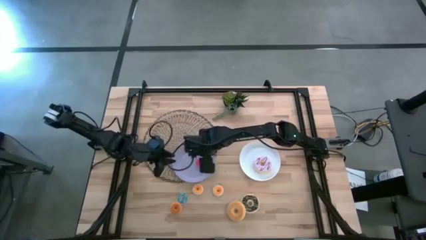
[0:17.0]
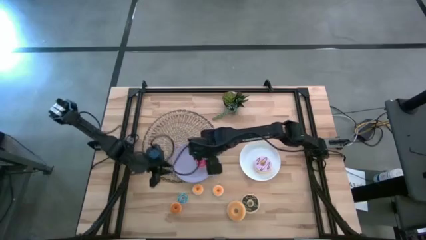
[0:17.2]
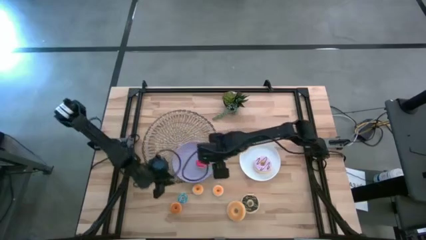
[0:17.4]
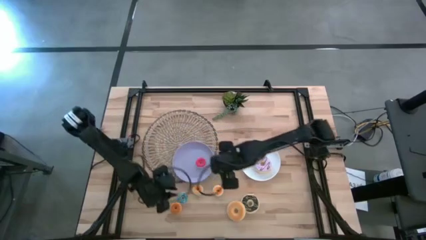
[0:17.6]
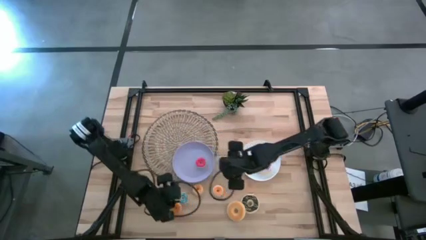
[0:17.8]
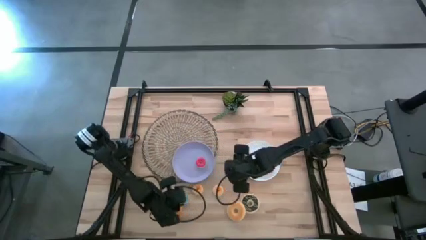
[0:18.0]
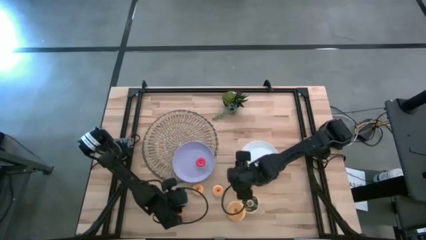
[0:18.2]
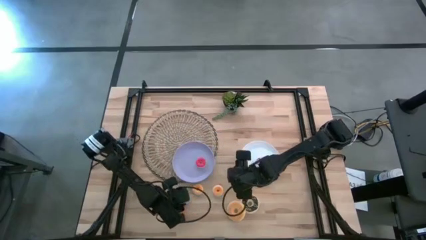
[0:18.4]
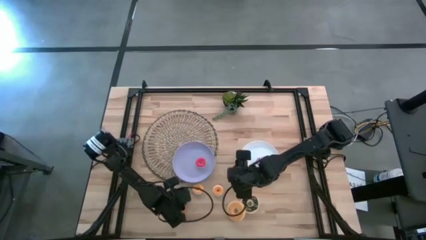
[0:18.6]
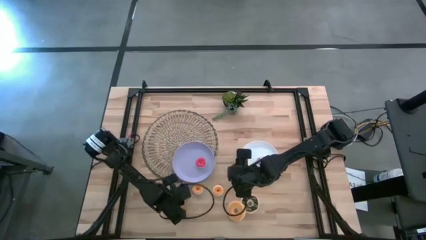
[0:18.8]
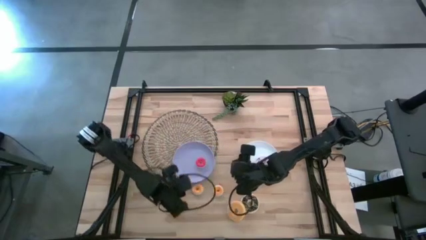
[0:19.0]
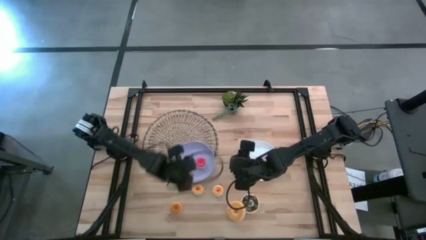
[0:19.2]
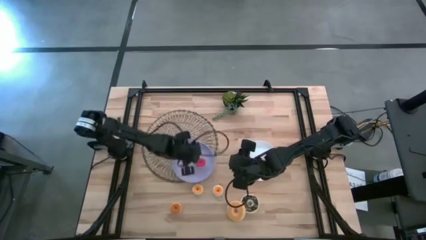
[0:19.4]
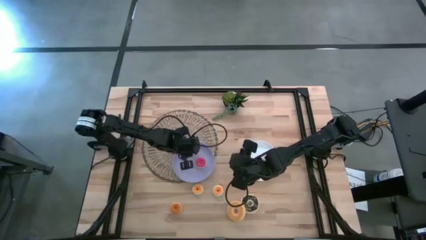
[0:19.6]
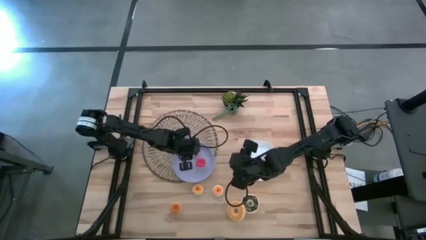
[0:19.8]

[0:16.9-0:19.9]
Task: Pick & Place donuts
Put the small blue donut on the purple plate

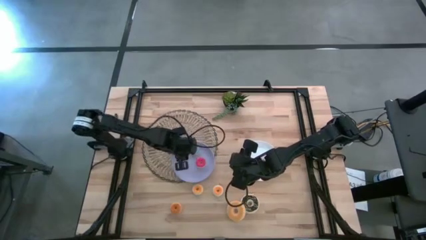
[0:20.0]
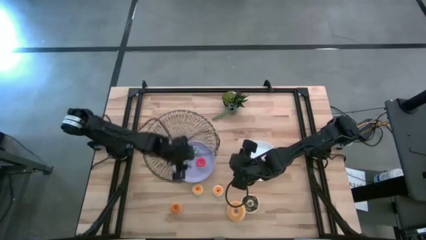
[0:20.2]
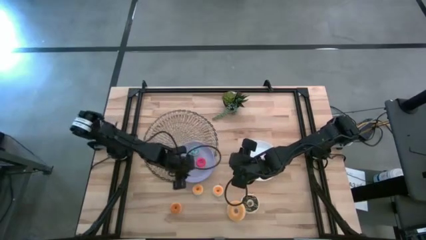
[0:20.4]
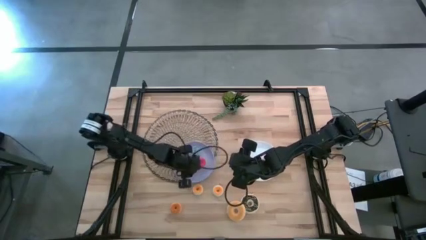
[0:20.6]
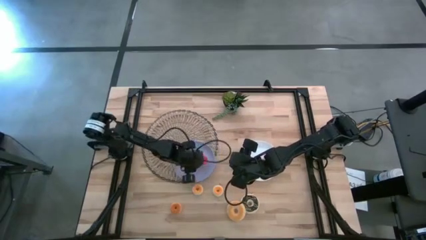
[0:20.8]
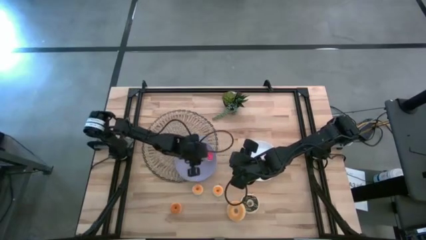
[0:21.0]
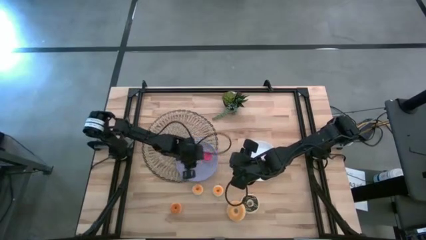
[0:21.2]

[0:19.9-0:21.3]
Adjust the small red donut on the purple plate

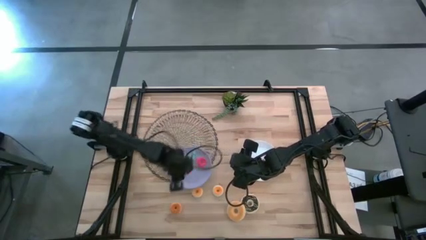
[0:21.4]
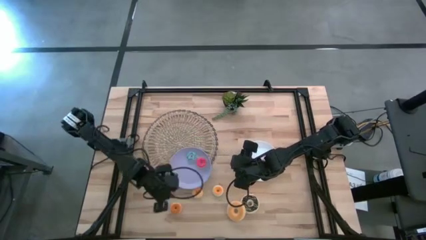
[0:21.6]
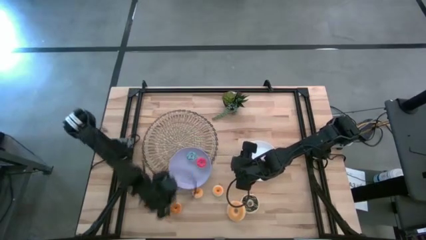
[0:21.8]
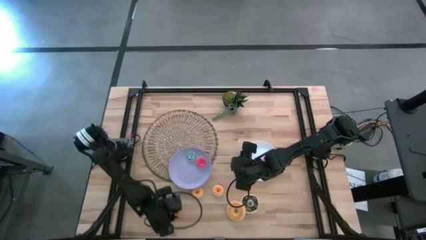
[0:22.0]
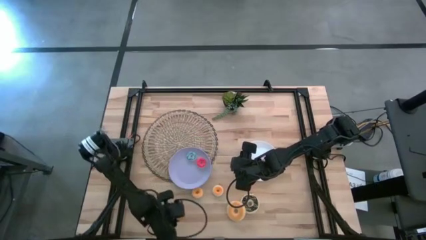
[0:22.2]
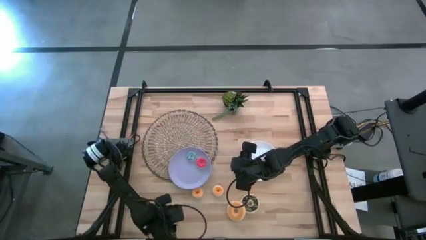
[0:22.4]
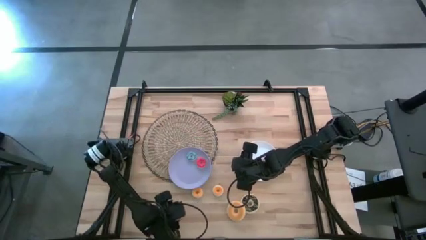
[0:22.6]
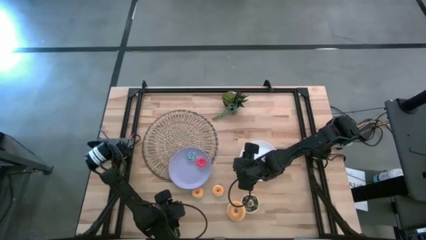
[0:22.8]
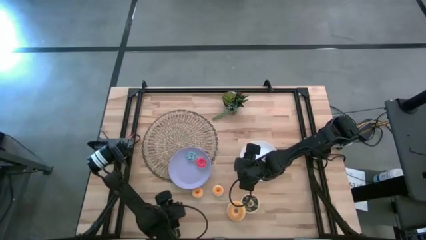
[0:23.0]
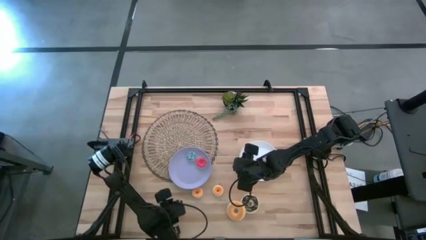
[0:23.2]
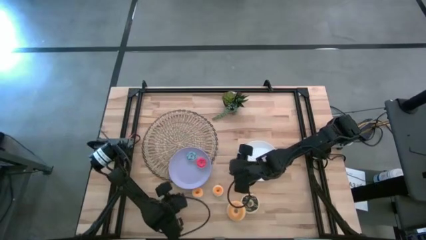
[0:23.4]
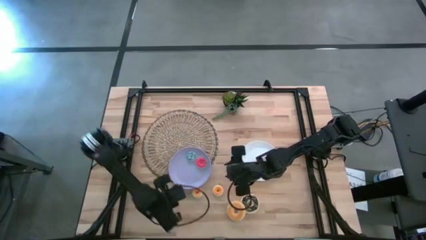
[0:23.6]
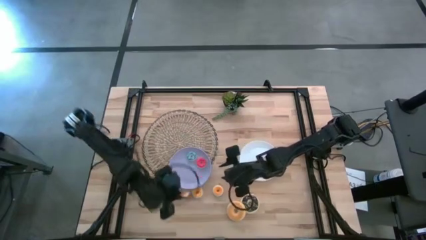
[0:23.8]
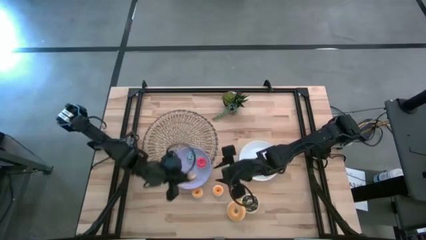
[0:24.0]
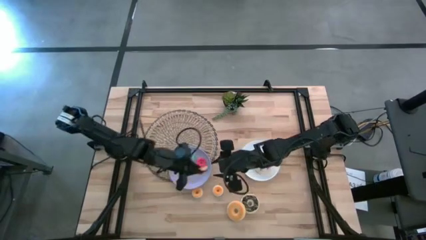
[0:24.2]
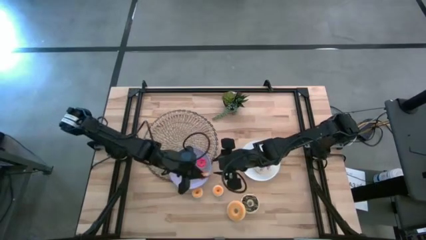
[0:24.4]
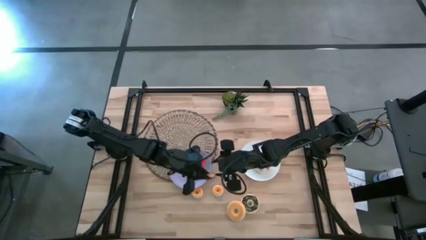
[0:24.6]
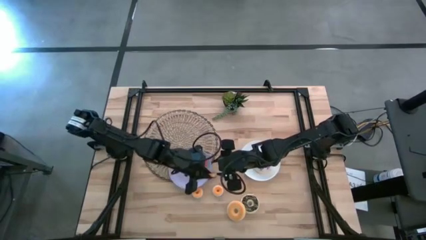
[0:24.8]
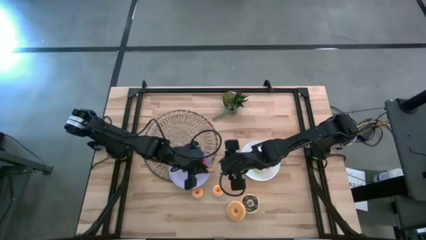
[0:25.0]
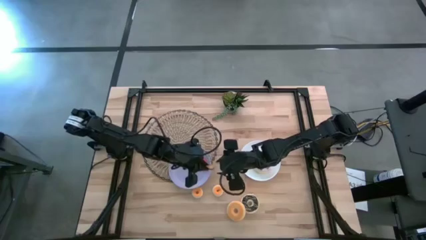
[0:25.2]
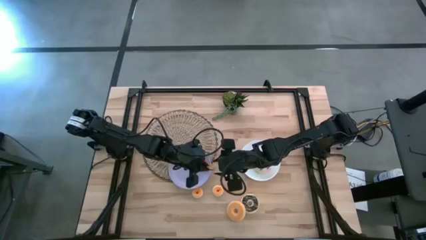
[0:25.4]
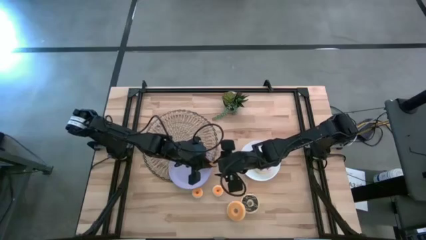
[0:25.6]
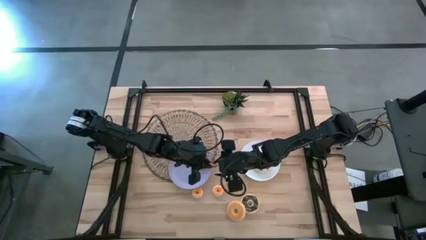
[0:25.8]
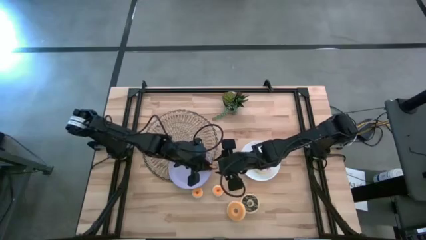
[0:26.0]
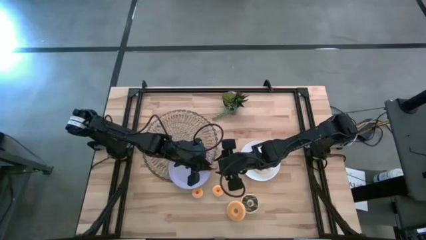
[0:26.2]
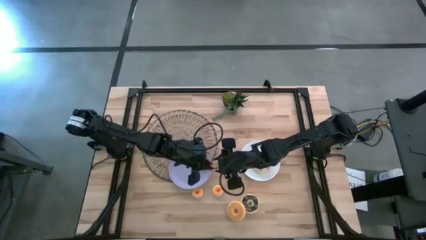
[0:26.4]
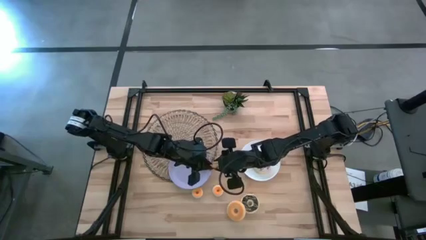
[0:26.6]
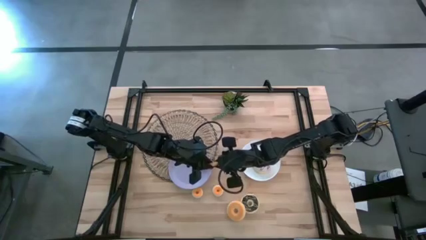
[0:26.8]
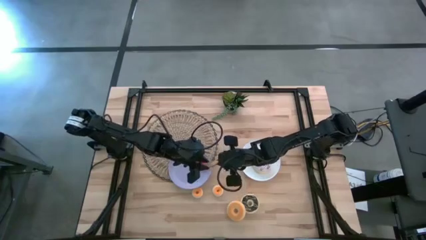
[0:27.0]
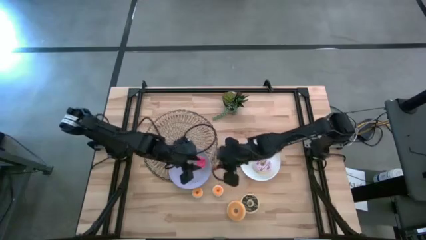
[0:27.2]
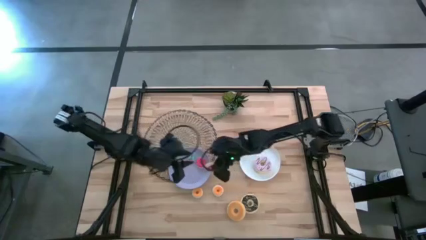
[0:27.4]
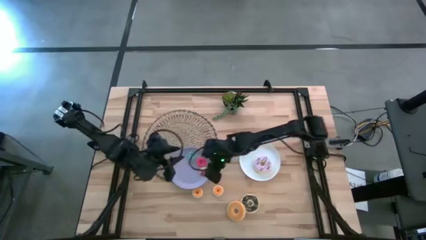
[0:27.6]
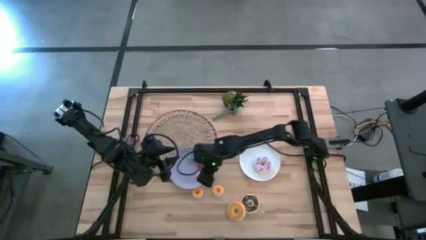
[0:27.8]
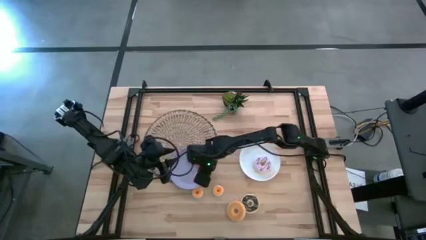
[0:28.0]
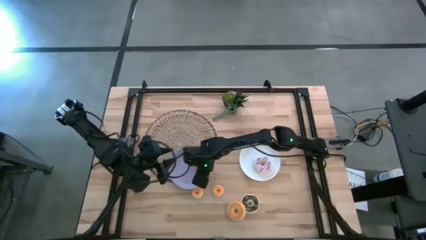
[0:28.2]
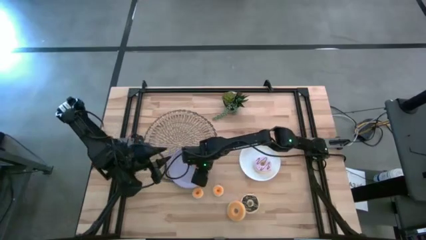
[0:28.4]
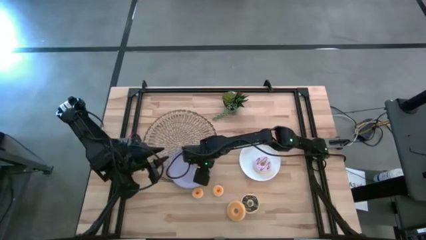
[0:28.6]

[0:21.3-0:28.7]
Put the small pink donut on the purple plate

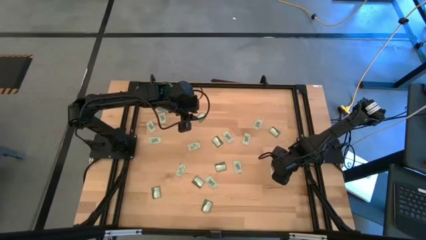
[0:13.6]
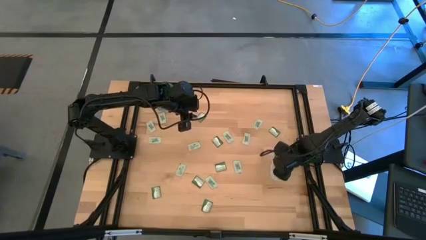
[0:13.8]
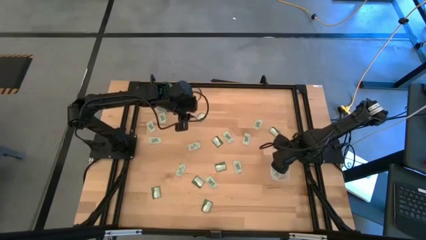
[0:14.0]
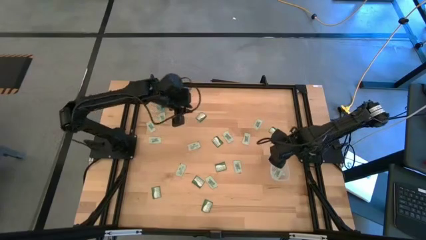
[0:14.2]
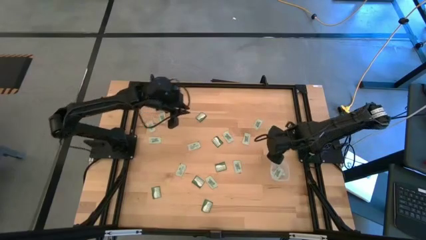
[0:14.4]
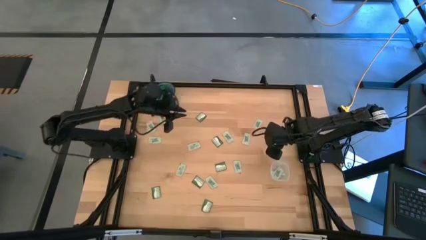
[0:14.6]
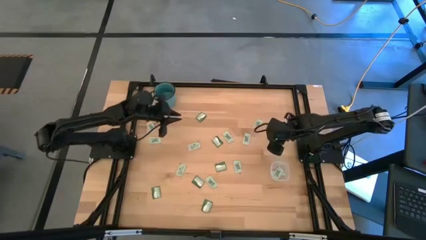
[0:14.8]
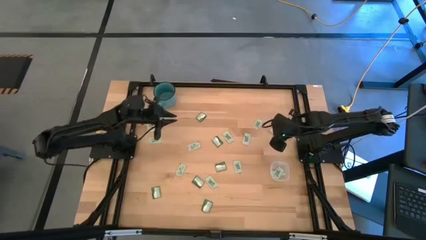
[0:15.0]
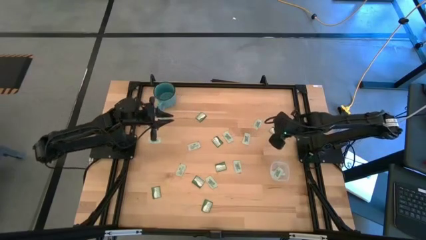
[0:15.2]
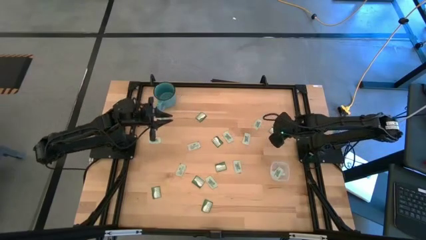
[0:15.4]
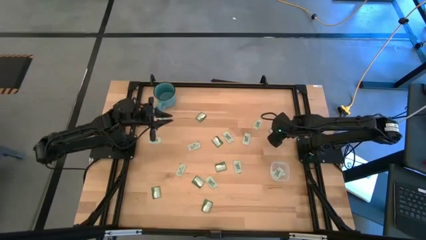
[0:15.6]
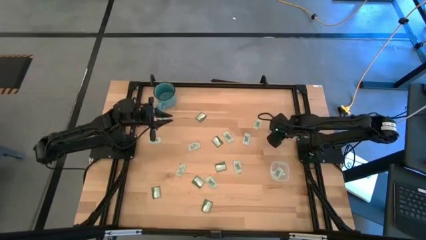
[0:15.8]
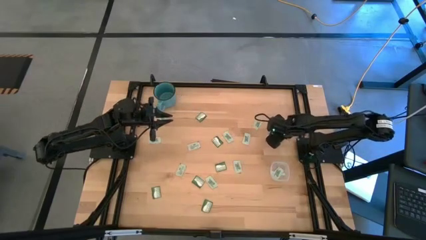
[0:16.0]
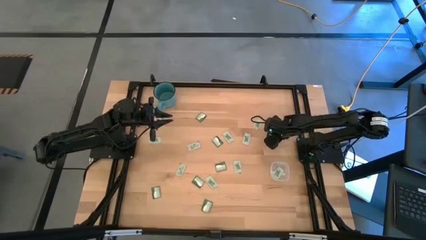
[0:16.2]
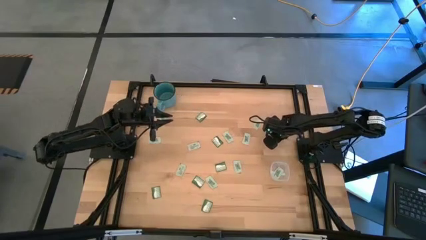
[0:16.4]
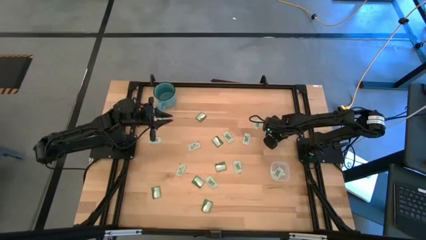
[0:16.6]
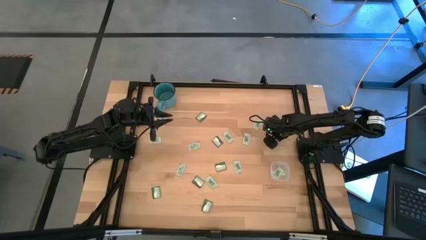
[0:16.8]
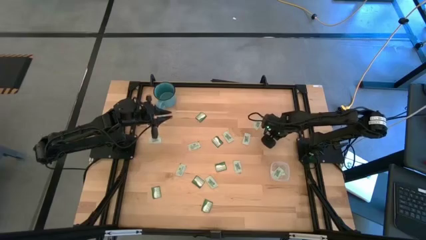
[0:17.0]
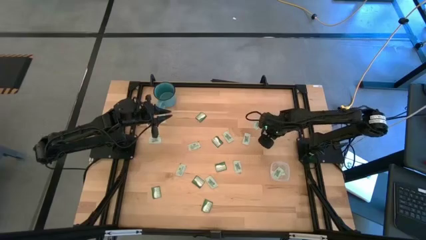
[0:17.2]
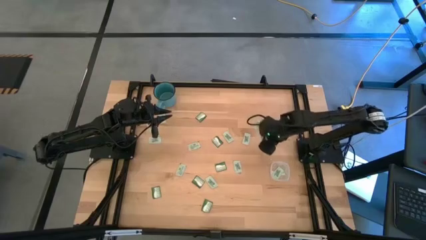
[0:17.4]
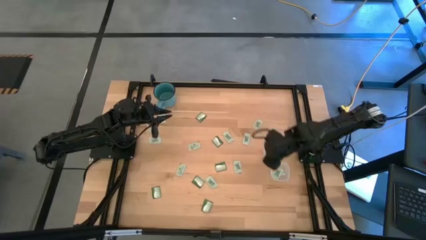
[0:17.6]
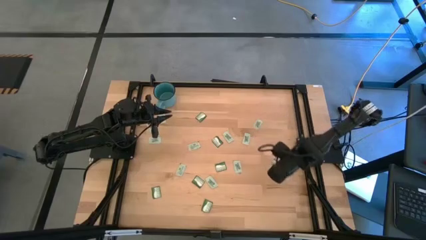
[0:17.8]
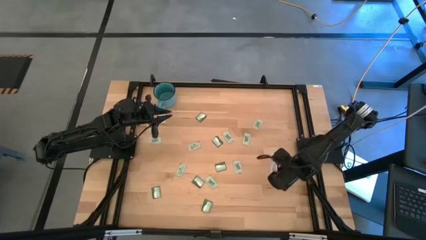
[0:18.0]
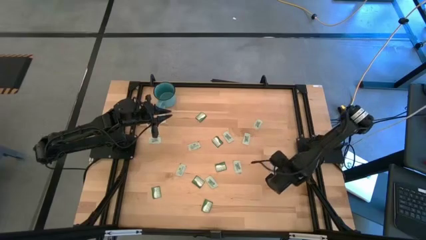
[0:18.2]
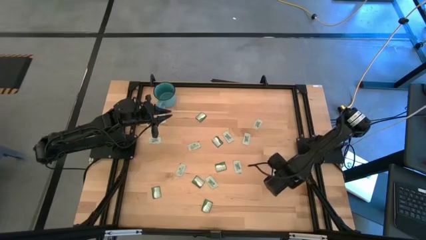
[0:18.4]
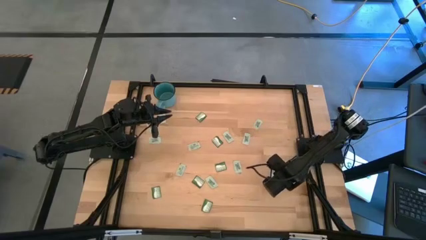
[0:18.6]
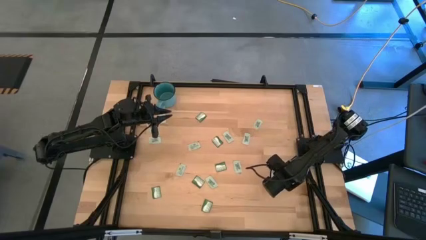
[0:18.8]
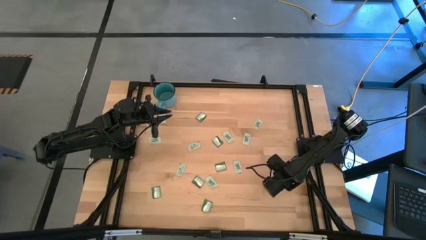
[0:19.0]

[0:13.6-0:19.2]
Task: Pick and place items into bin
Put the green stevia packet into the transparent bin
